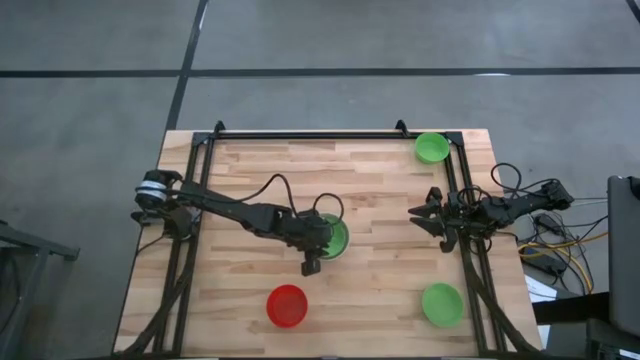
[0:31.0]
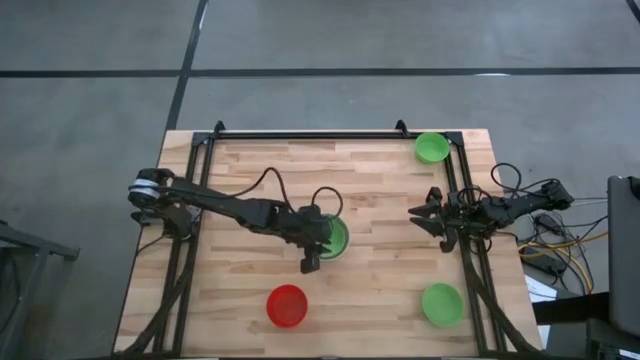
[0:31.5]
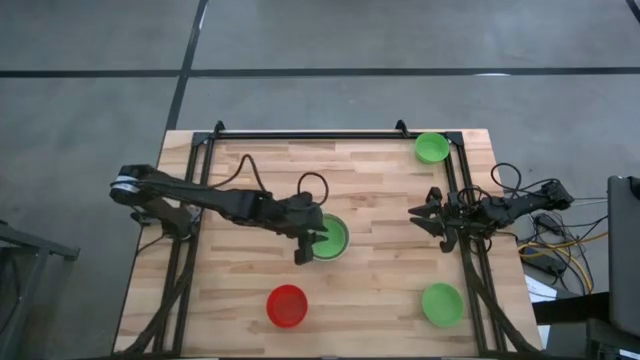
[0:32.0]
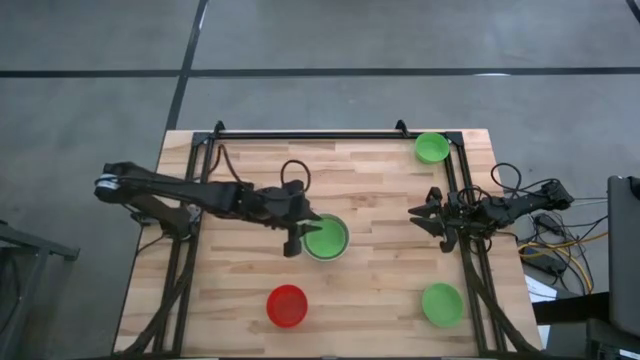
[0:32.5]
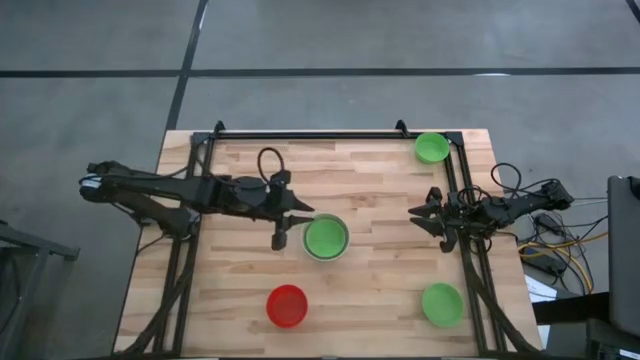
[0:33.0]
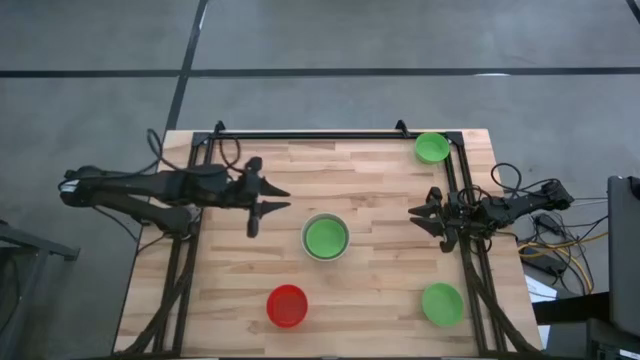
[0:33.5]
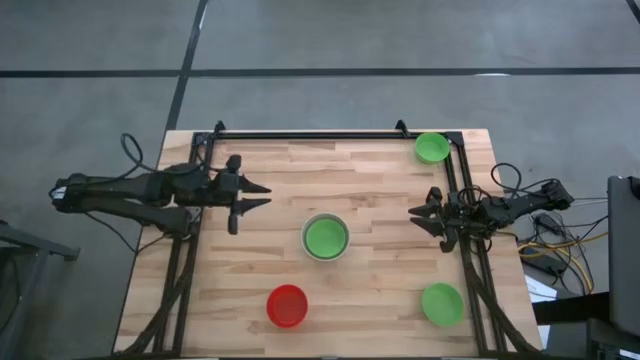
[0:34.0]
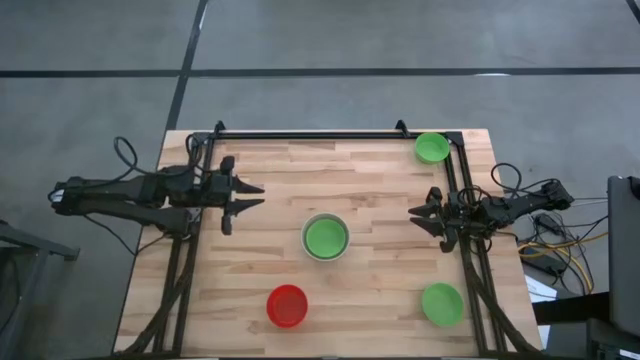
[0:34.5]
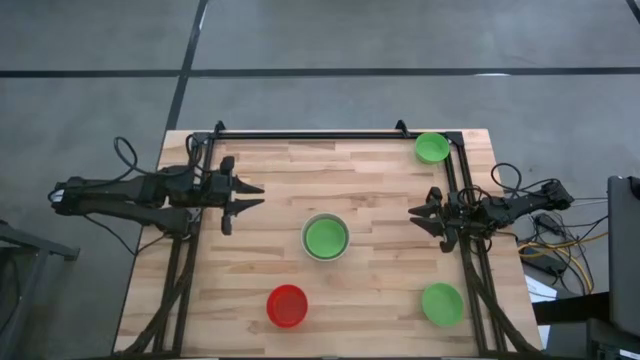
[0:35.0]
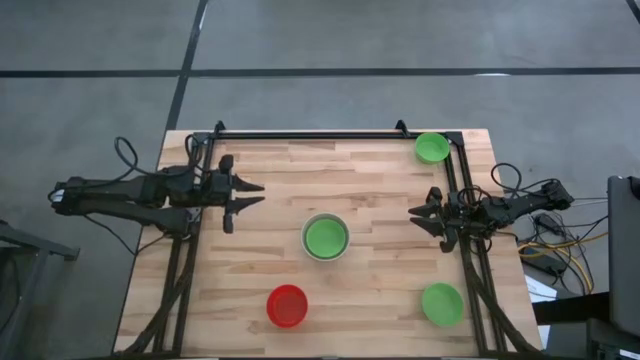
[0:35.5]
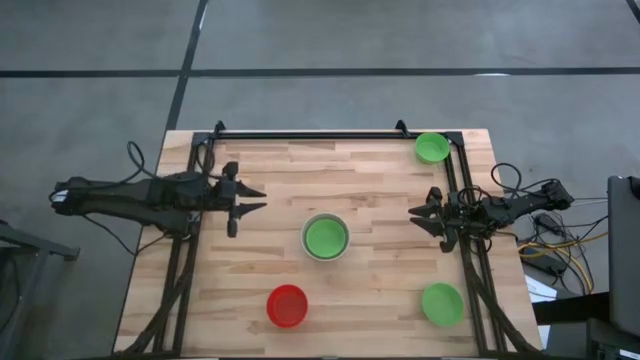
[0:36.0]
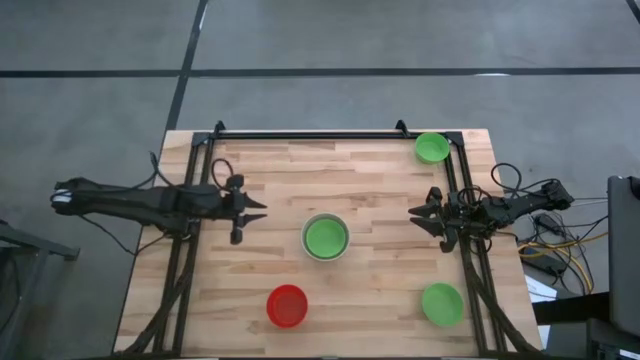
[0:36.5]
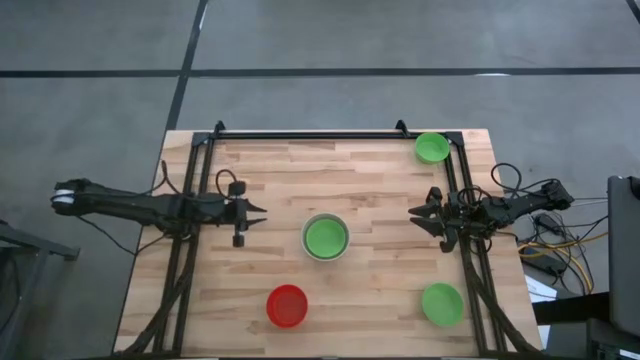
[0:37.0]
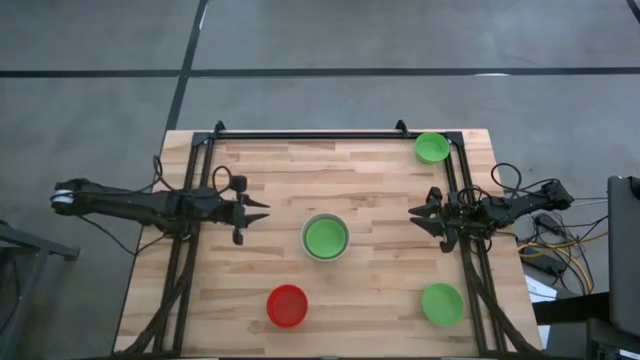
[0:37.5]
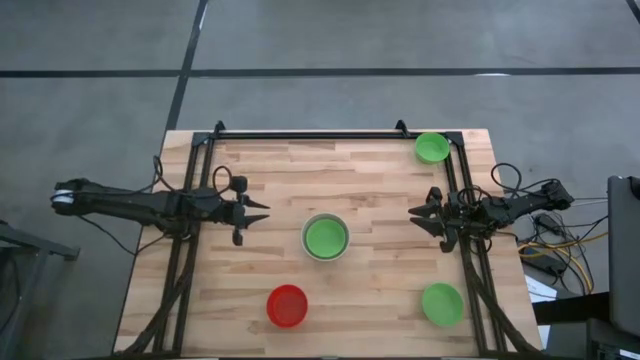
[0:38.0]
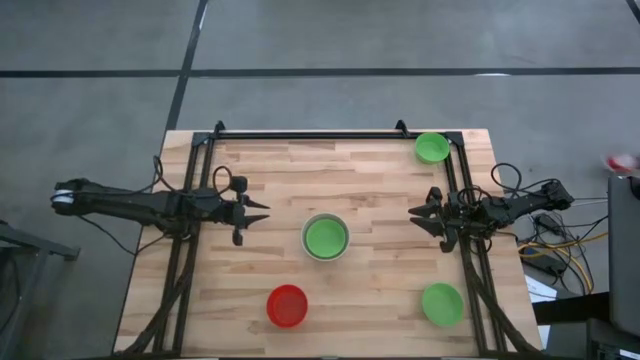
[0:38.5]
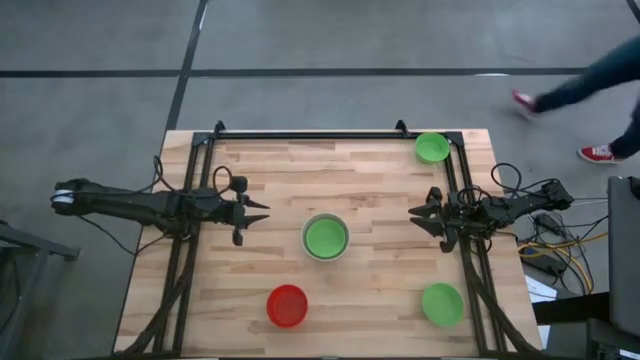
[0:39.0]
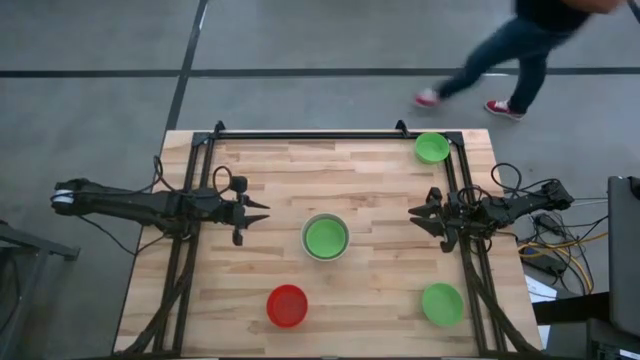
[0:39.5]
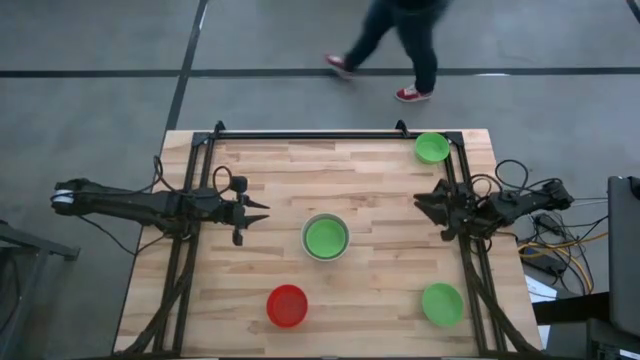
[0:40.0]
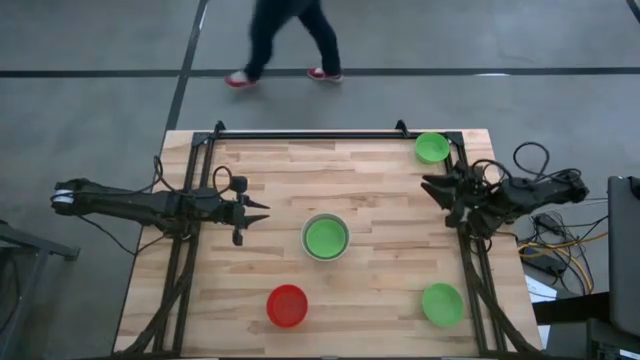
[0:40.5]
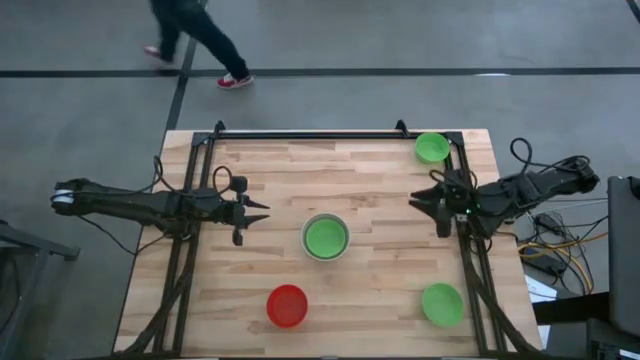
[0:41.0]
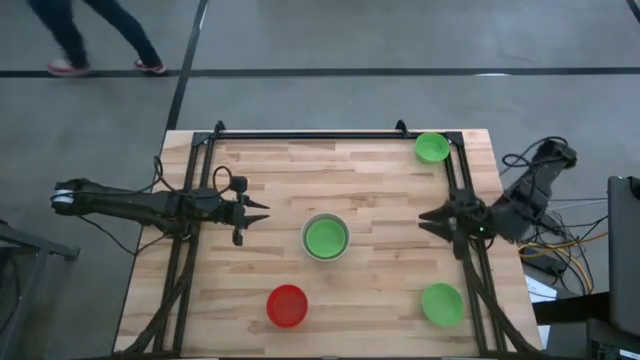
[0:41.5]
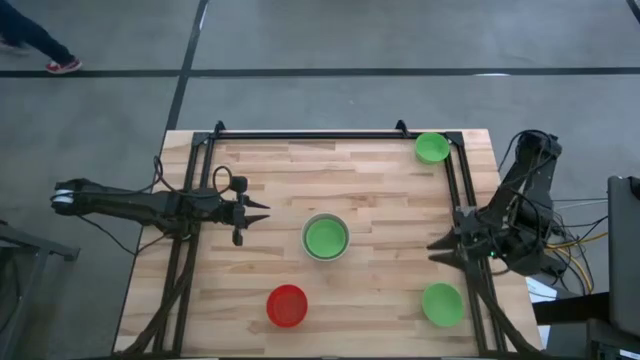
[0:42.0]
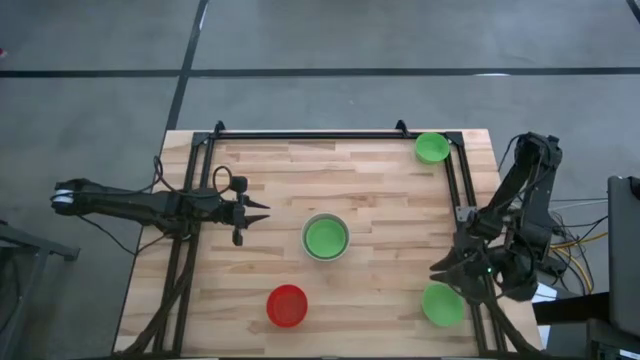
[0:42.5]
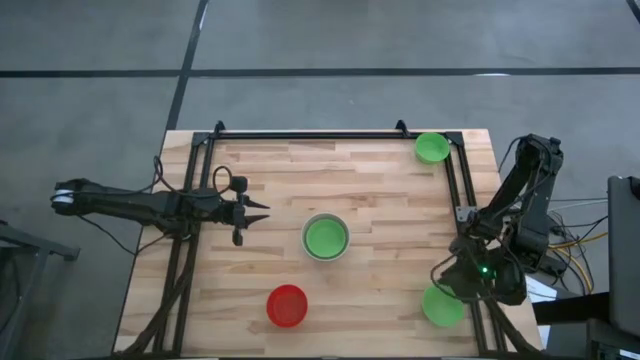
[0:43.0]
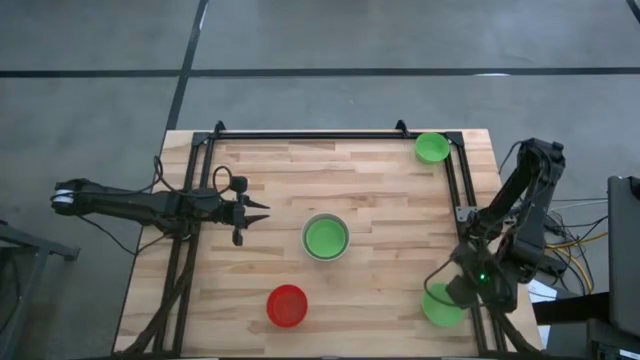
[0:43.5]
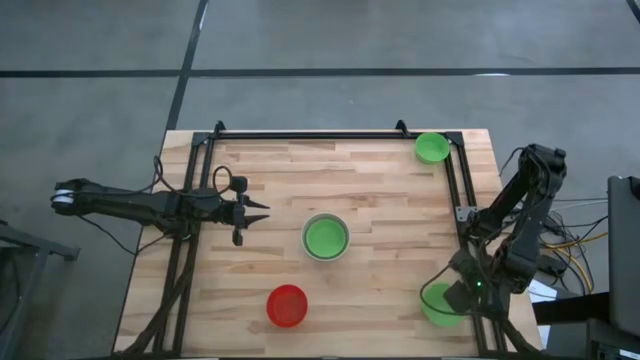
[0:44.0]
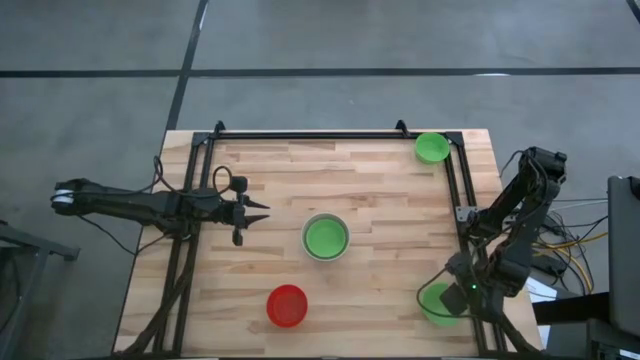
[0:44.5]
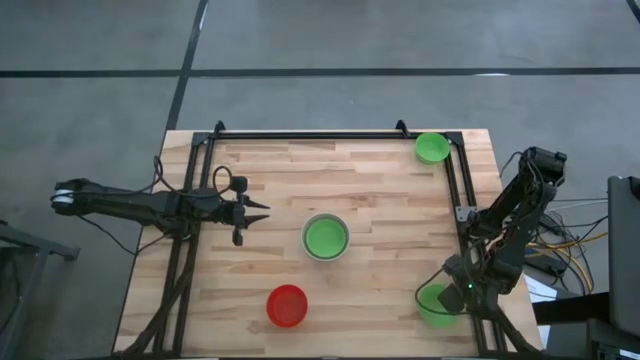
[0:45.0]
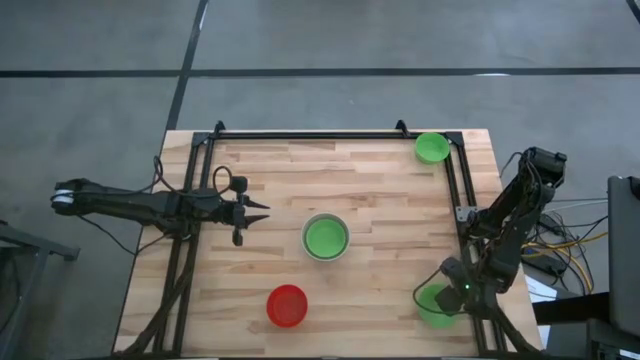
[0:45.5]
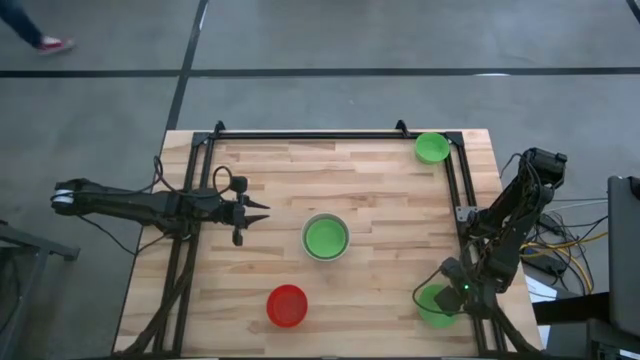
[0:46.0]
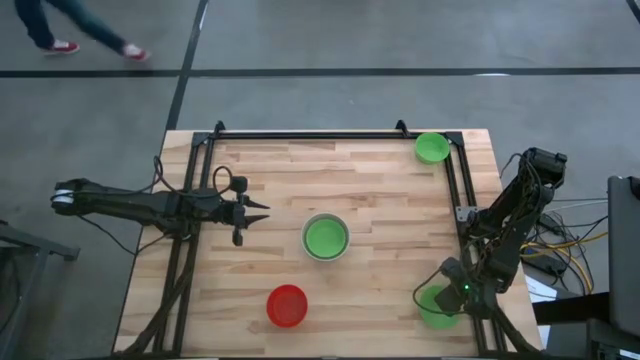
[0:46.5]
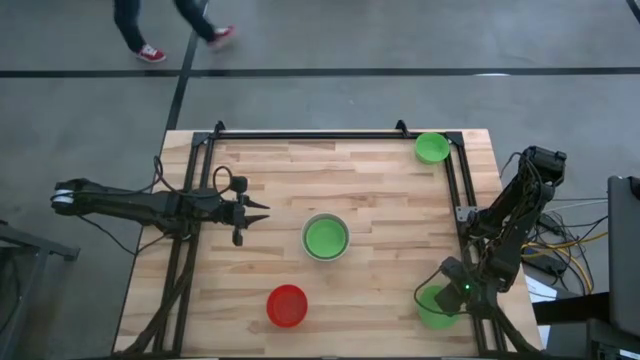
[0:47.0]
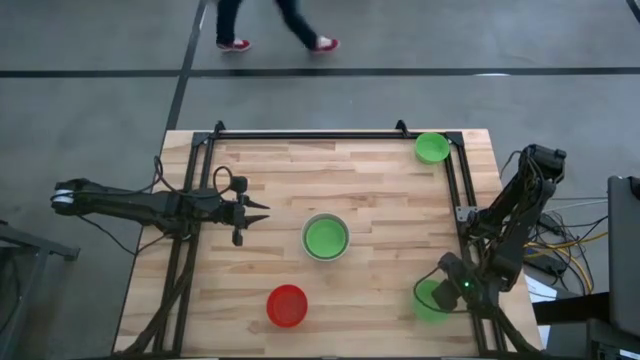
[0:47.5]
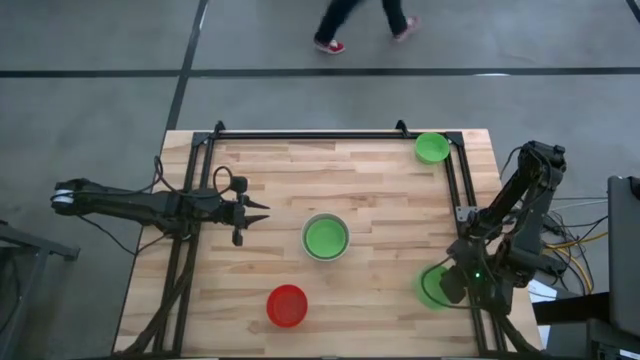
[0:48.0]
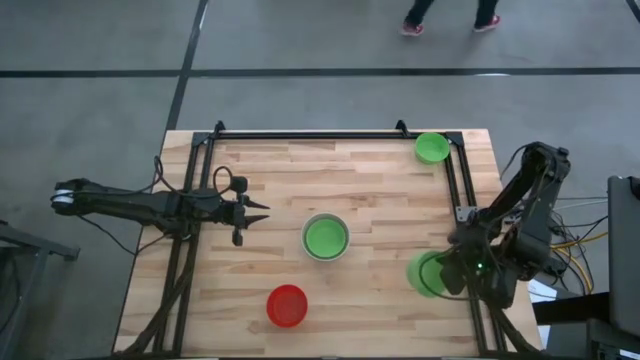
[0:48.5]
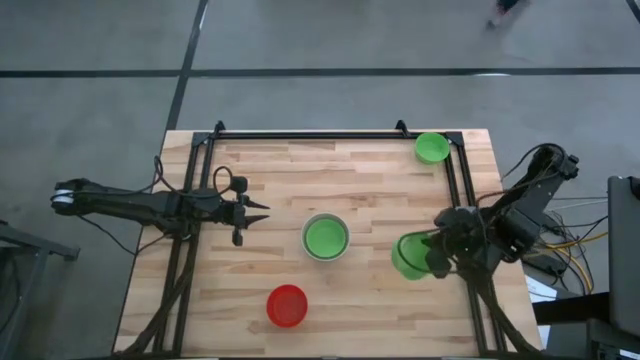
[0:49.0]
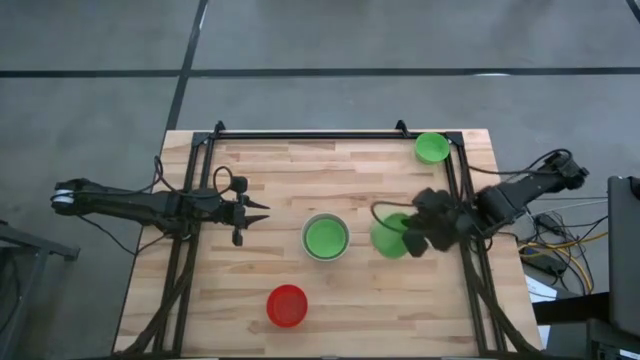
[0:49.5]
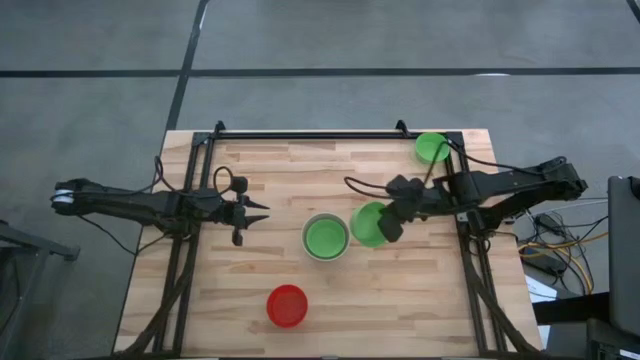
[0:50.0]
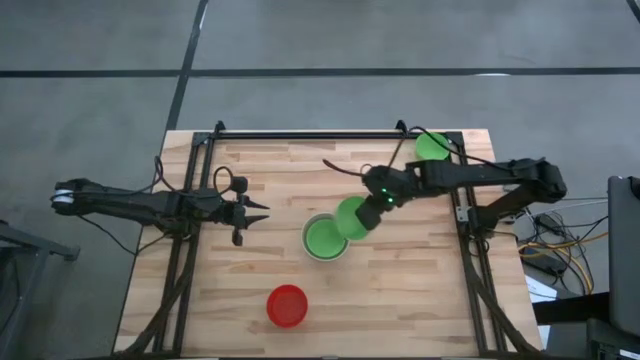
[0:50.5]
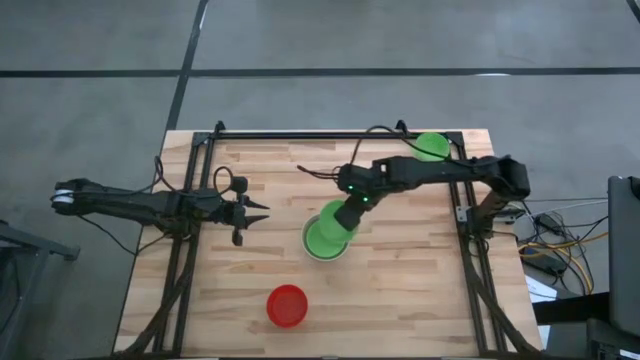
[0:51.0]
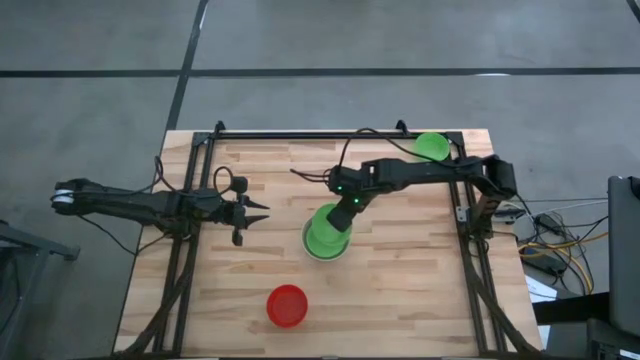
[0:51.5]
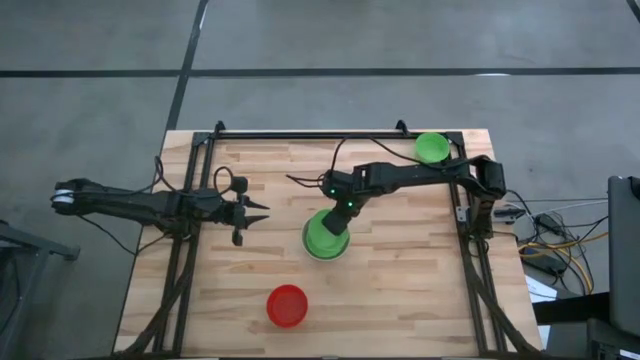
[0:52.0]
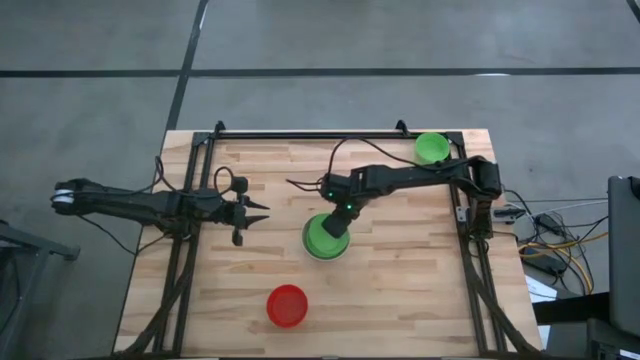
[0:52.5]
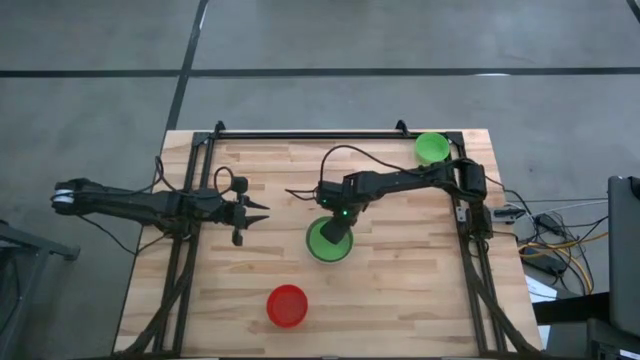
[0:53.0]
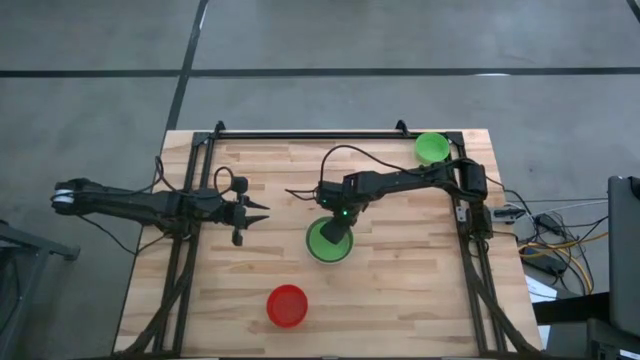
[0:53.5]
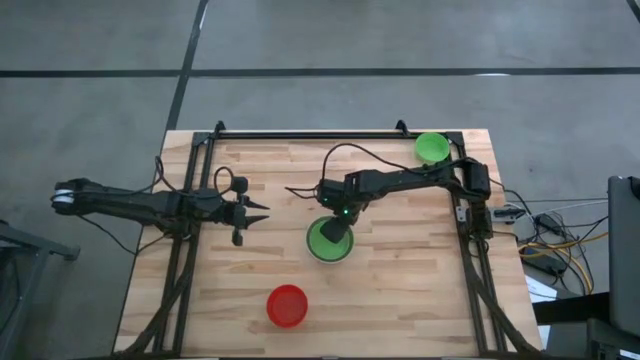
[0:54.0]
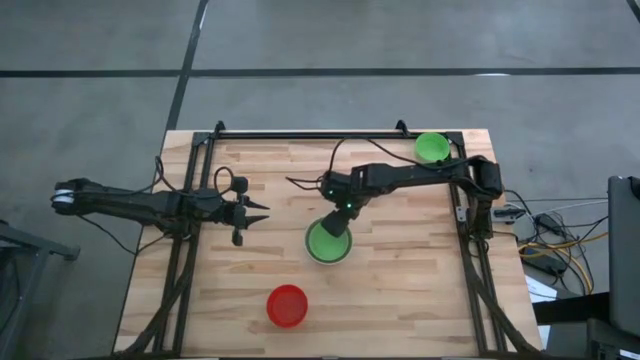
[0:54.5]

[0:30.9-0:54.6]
Stack the bottom green bowl on top of the left green bowl
